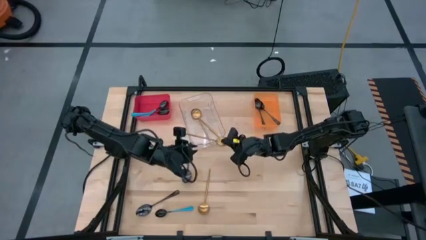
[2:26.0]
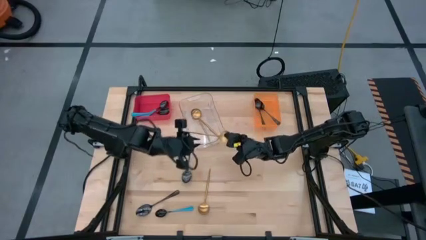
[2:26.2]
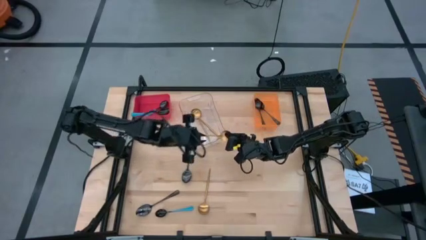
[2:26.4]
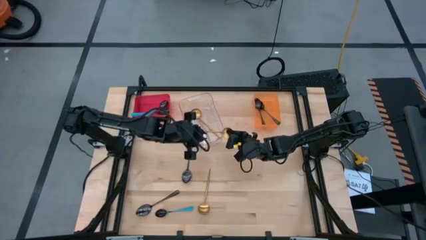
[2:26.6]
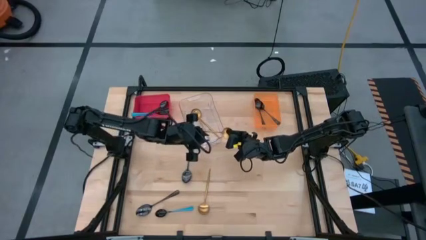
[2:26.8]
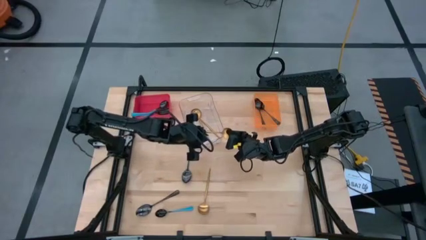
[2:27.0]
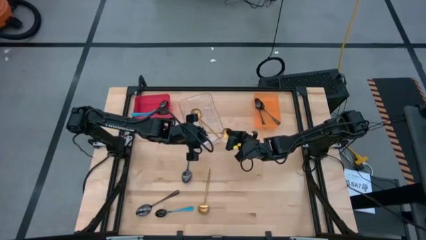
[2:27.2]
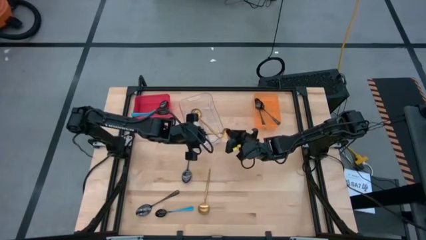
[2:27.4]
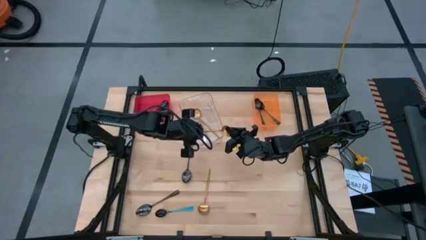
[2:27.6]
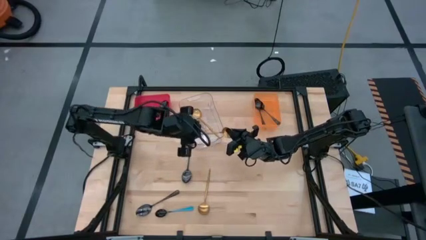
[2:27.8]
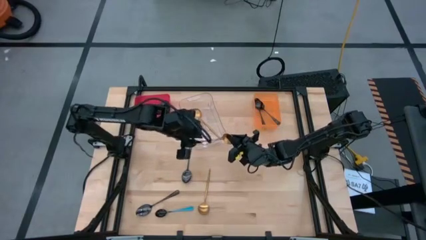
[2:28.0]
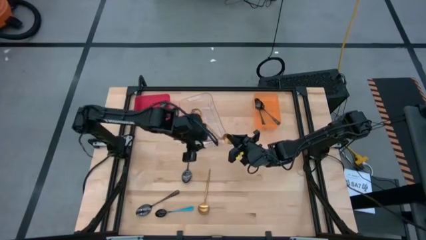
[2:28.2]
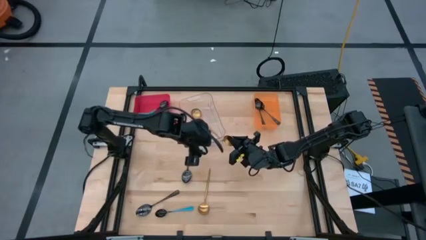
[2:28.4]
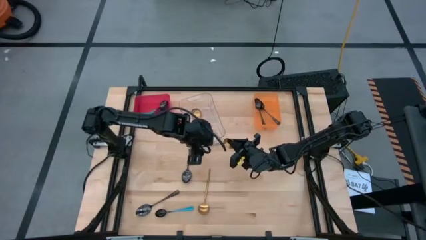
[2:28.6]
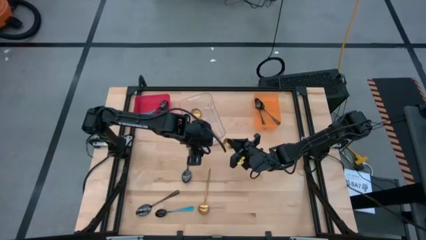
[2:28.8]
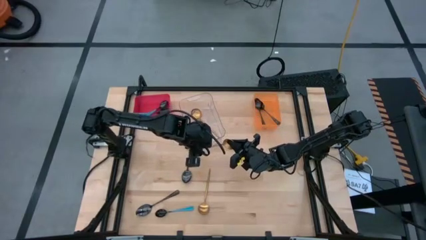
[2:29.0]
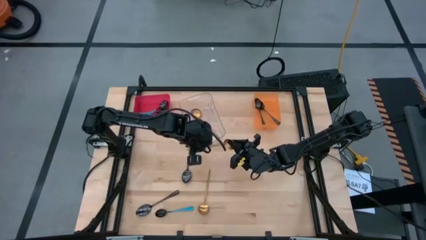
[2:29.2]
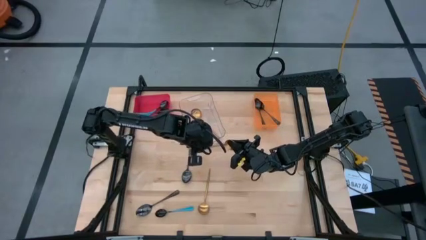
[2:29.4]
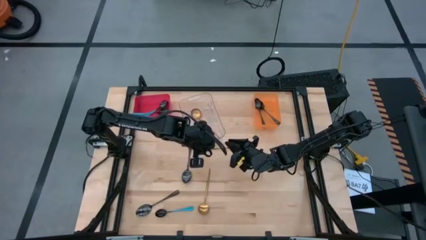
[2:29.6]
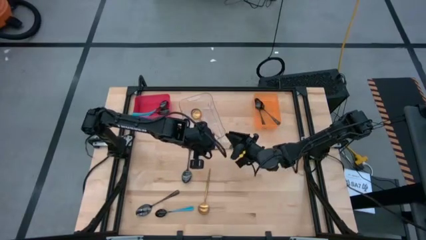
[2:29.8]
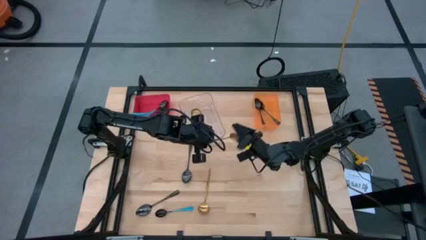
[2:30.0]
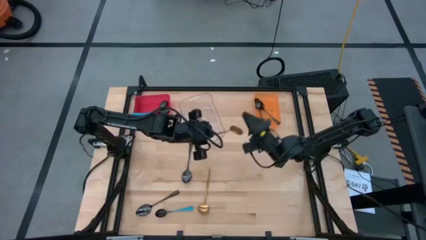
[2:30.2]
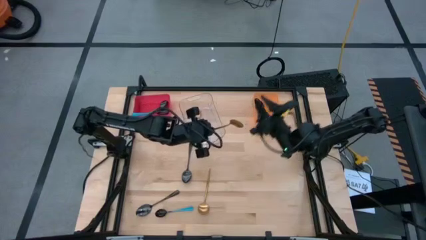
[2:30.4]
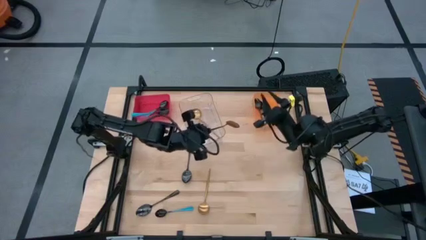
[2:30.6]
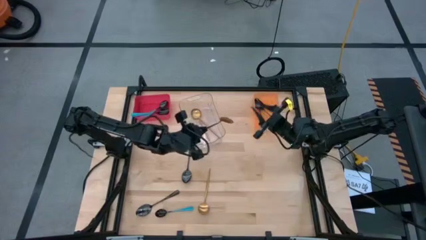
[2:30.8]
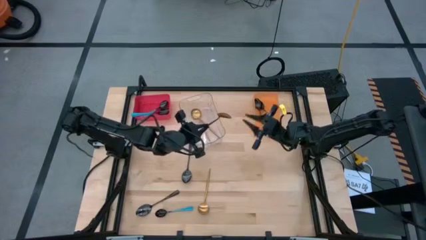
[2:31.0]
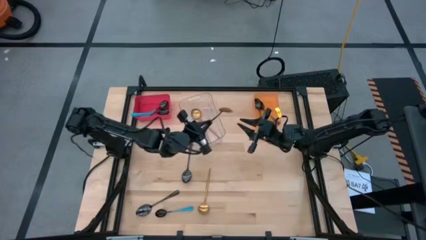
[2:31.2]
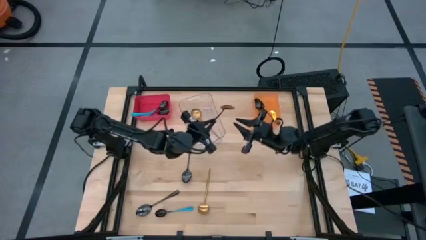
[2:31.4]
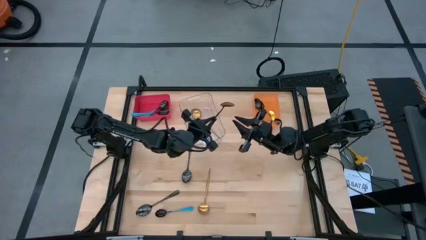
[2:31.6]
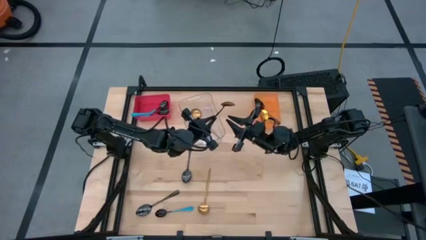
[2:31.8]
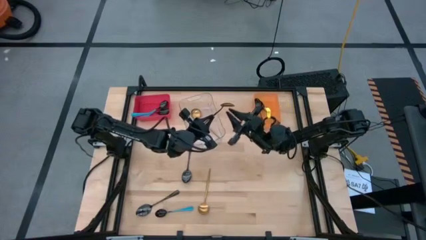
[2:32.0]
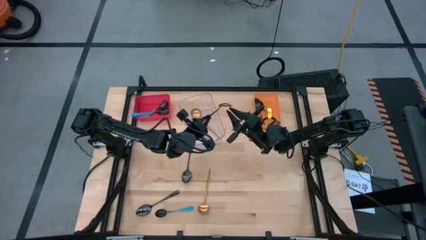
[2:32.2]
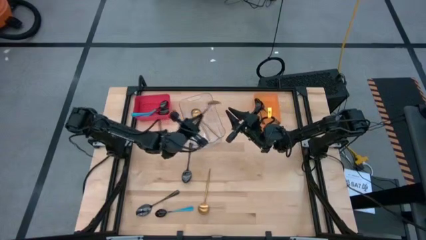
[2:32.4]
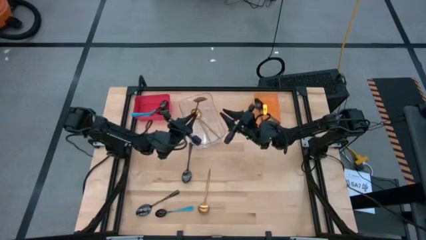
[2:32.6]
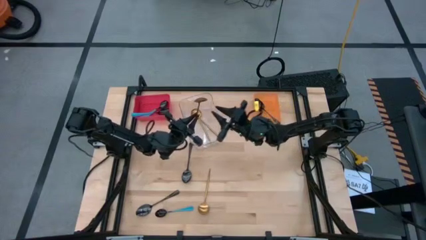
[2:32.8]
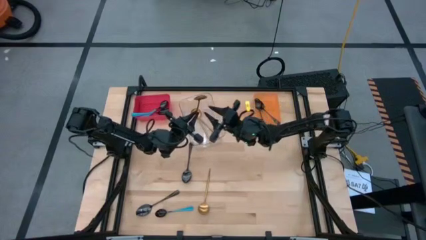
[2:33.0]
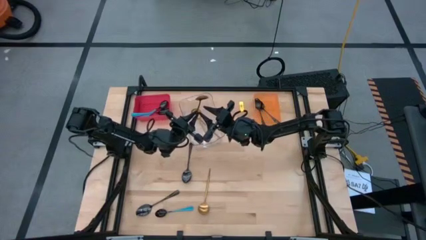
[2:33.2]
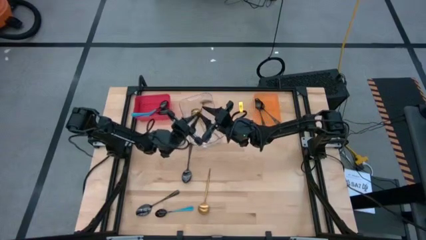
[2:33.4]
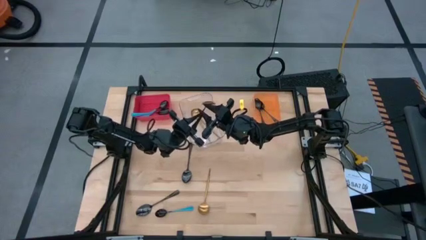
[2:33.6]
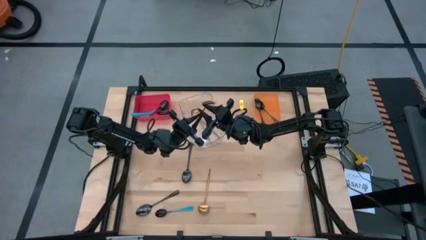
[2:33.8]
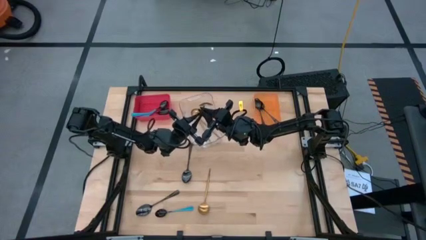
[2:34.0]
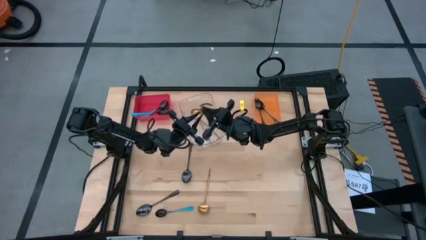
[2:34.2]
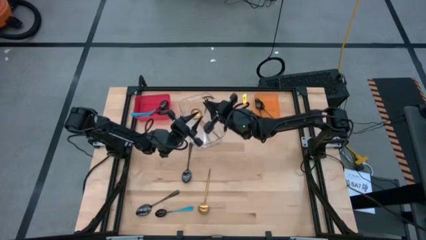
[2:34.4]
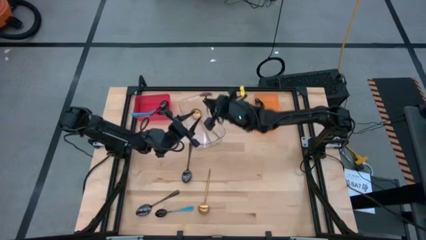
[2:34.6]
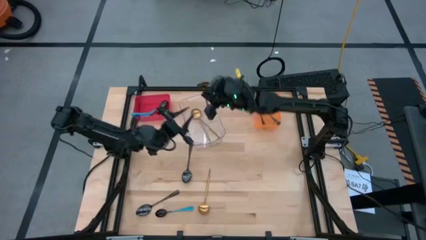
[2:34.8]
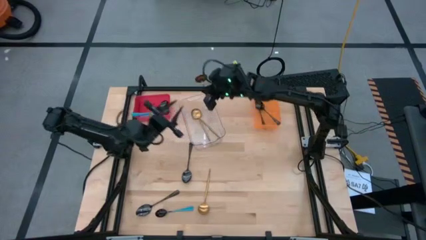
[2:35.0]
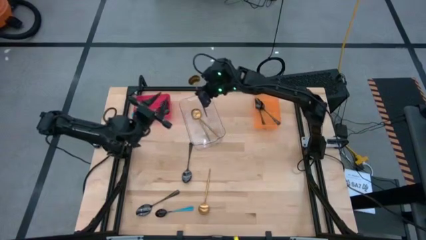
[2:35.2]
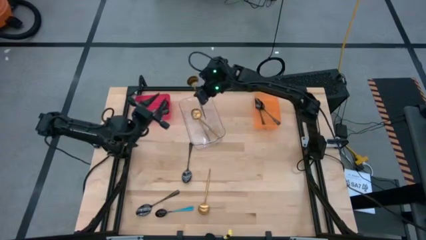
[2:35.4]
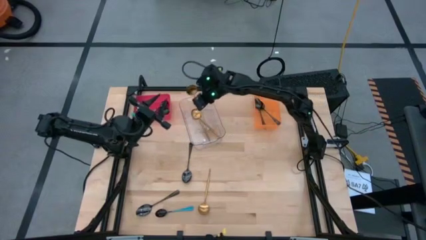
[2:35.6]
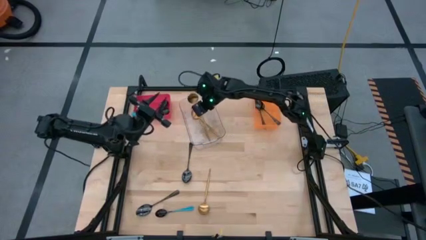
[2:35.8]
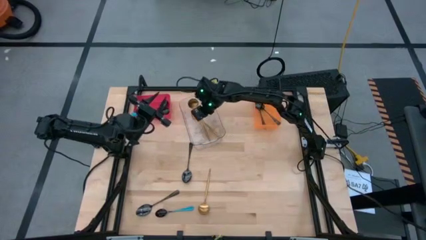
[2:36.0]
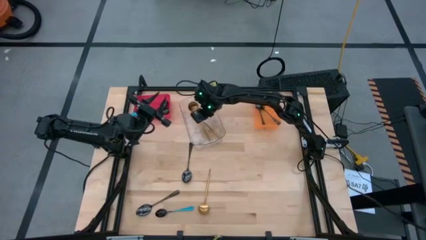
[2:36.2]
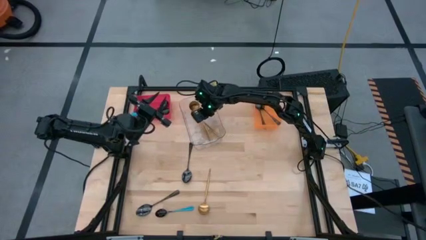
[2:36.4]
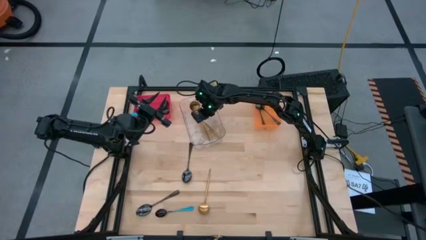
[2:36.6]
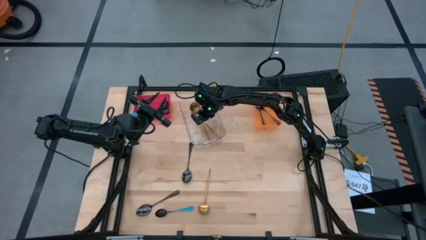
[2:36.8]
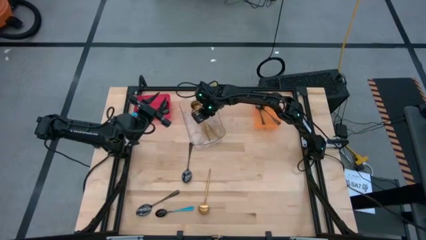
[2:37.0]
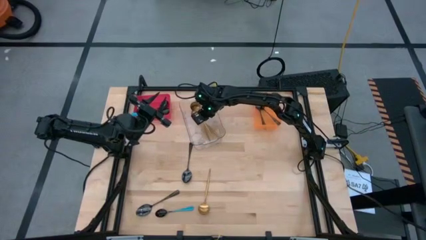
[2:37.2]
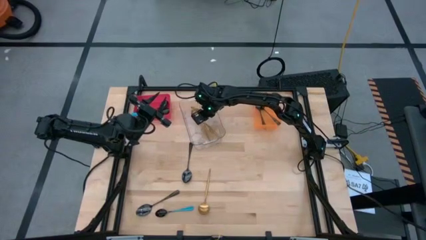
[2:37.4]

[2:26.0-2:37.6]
Task: Sort silverware by color (type)
Put the gold spoon into the transparent bin
